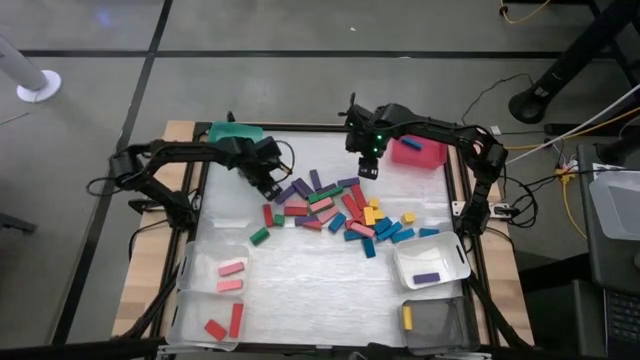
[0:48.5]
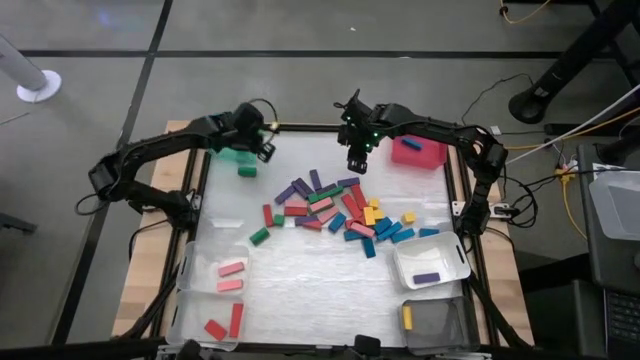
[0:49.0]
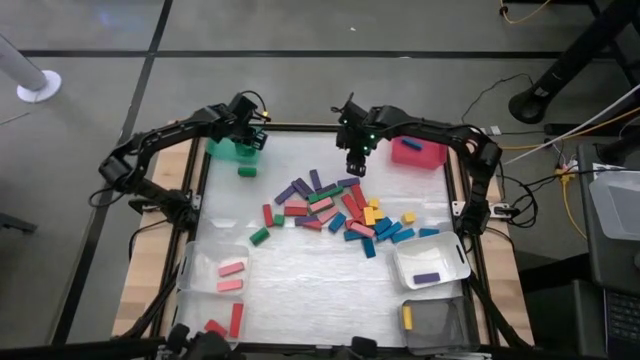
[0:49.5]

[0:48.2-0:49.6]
Task: Sort blocks
Put the green block into the green bin

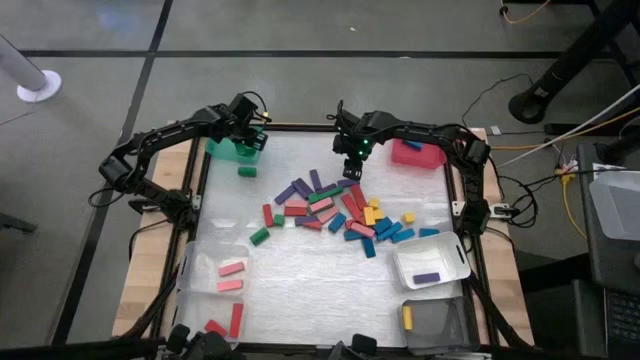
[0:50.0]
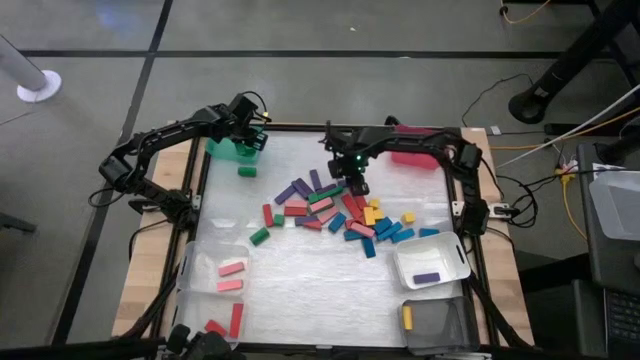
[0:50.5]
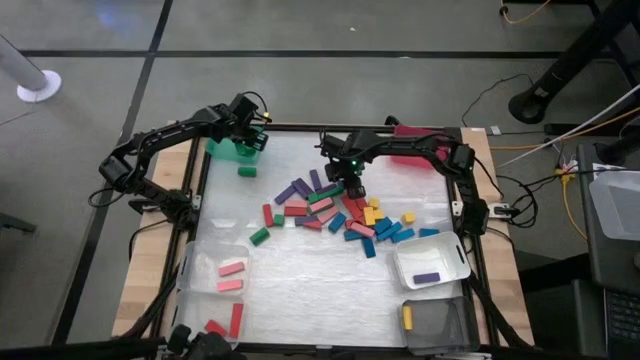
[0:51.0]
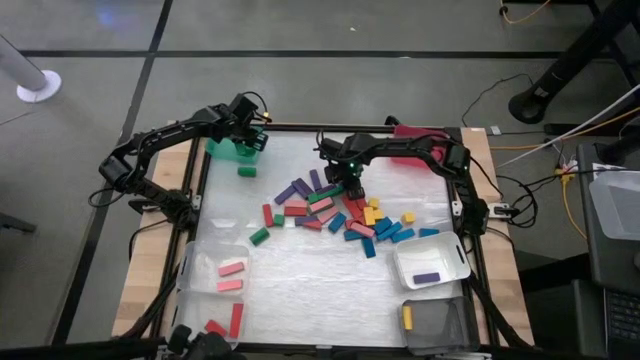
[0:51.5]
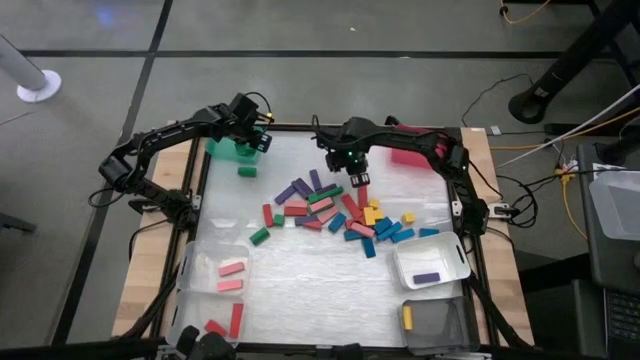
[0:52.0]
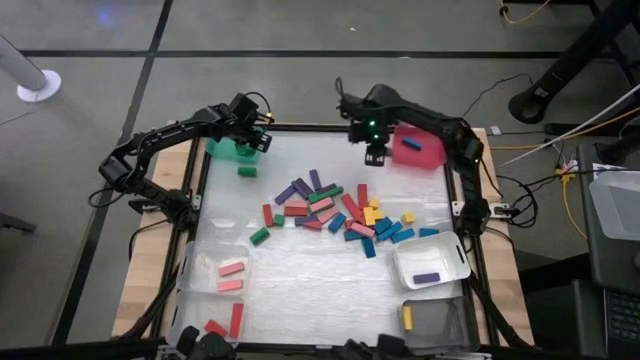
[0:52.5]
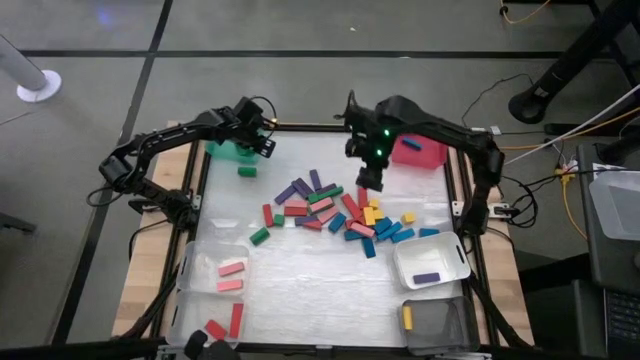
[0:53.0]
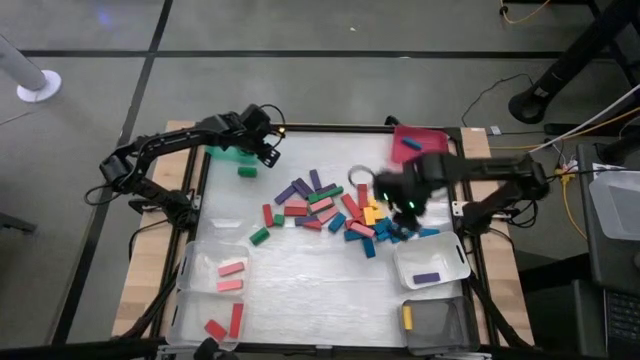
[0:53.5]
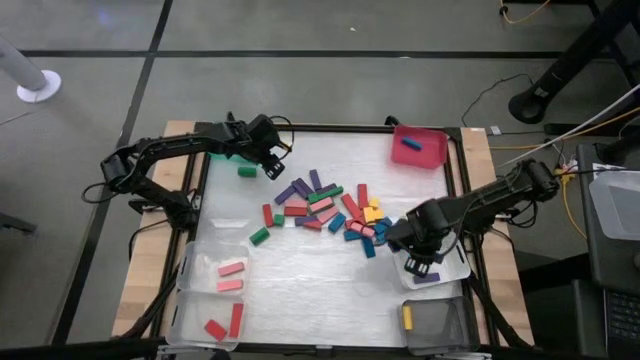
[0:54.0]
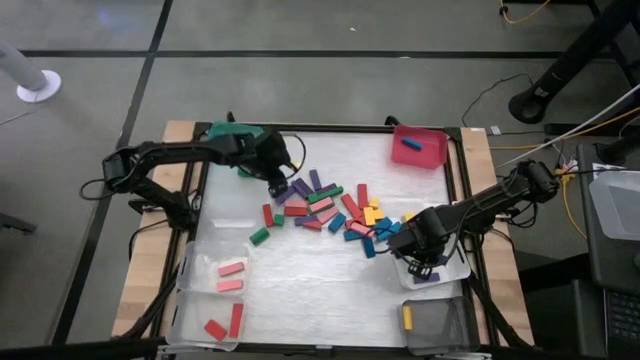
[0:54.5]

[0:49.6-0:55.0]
Put the violet block into the white bin

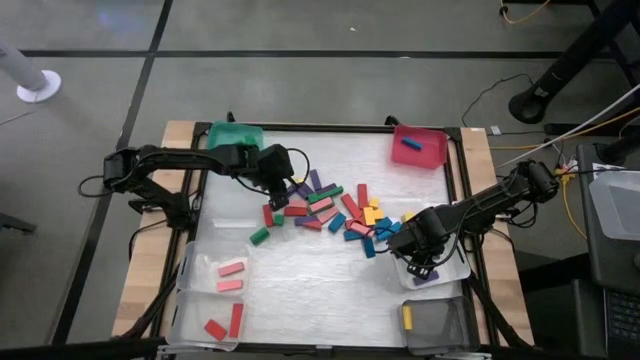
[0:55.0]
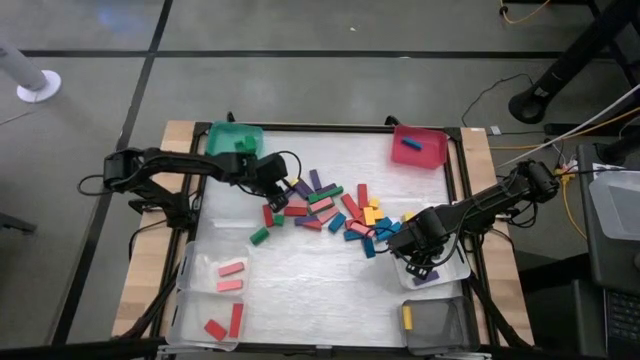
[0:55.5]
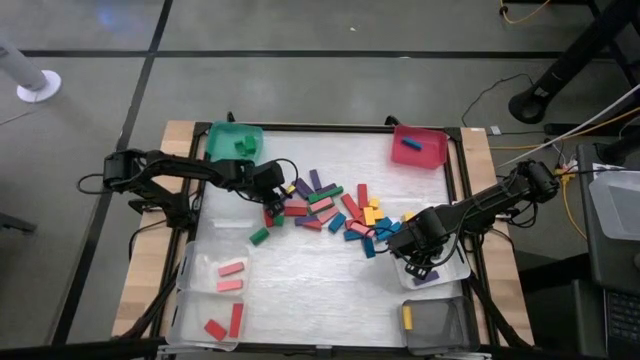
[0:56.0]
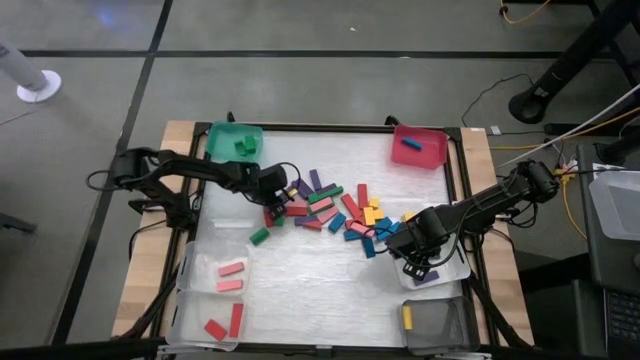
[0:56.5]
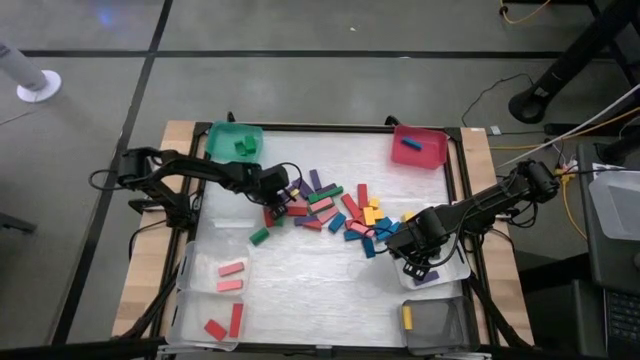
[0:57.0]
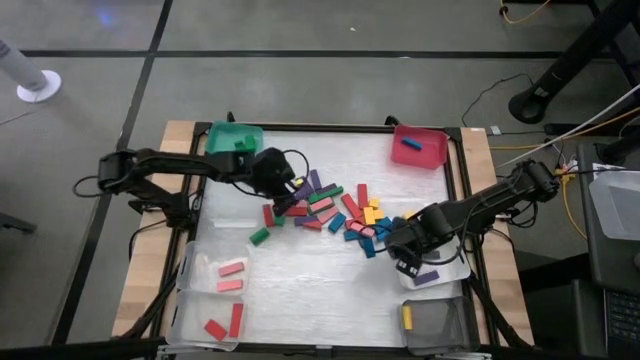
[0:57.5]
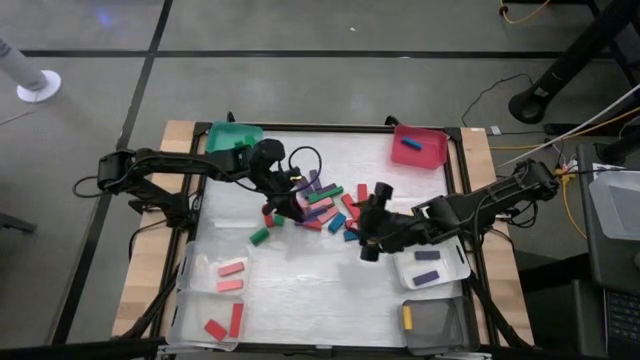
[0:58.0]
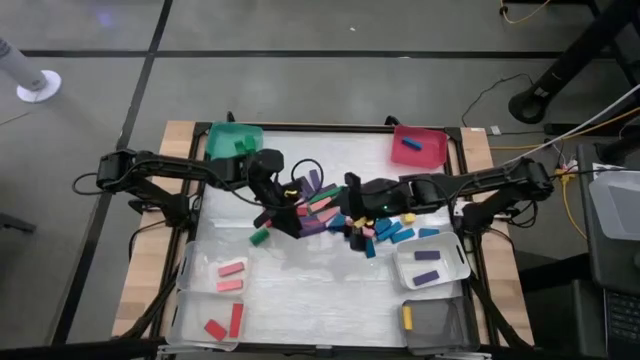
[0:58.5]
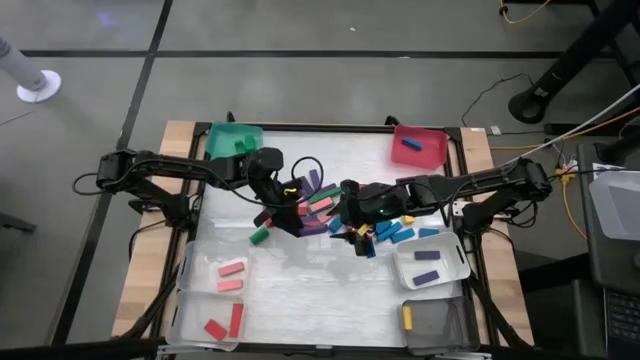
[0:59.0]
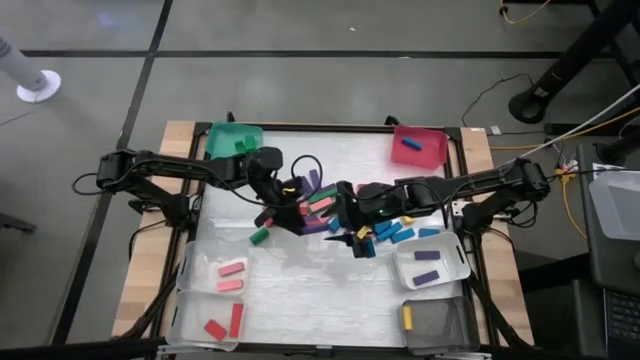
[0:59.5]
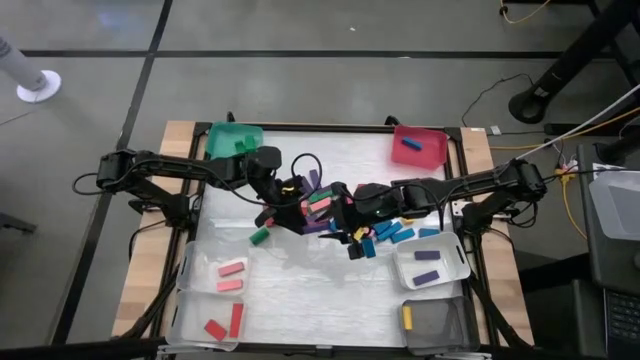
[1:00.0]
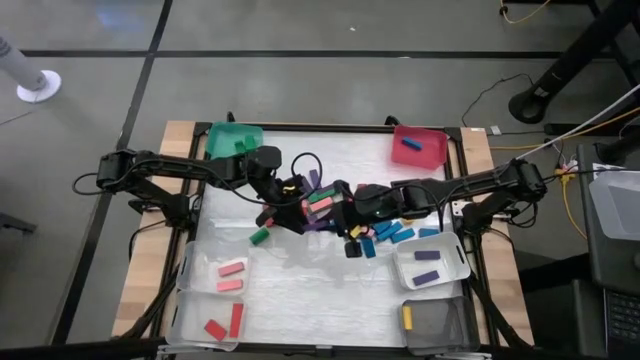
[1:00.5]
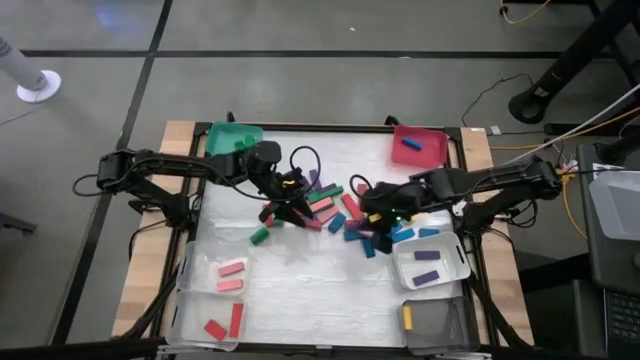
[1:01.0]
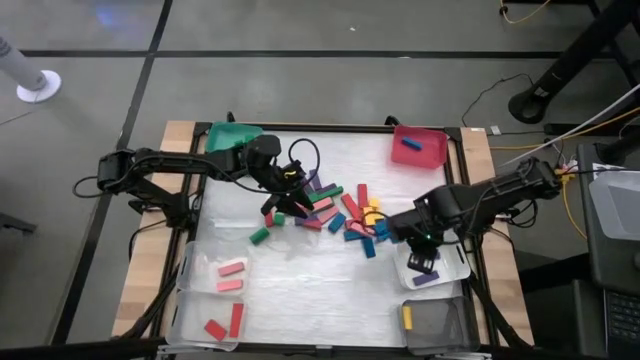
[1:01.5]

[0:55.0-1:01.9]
Put the violet block into the white bin

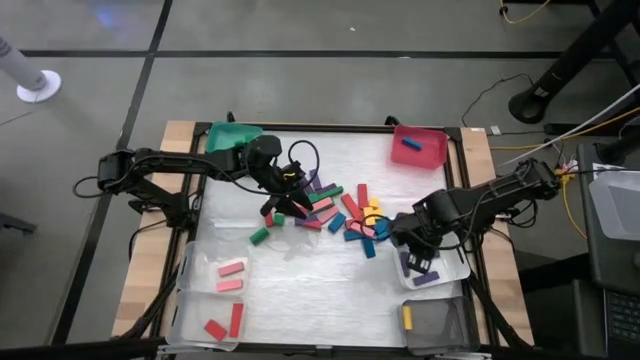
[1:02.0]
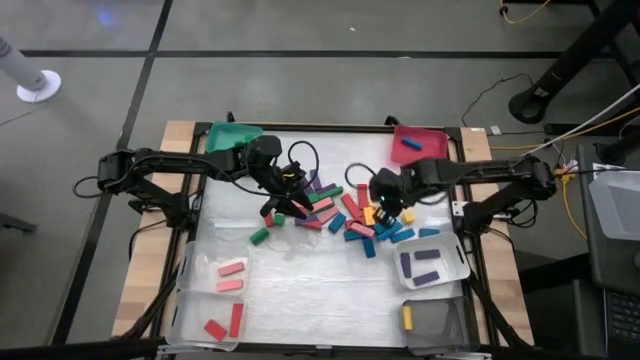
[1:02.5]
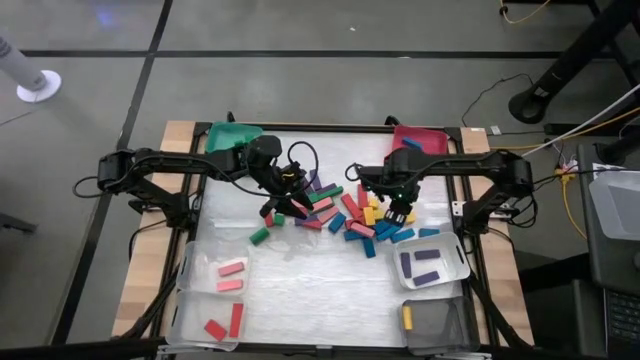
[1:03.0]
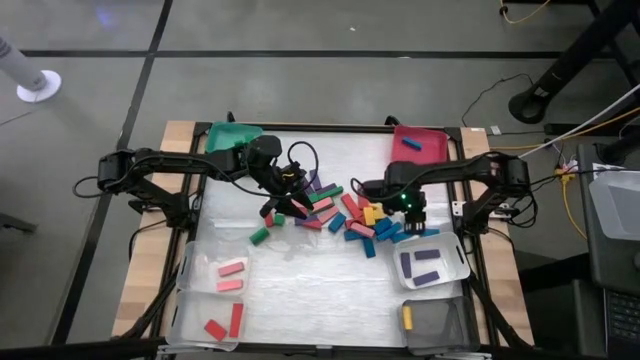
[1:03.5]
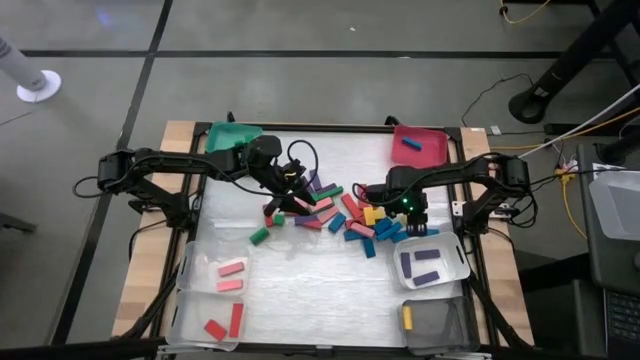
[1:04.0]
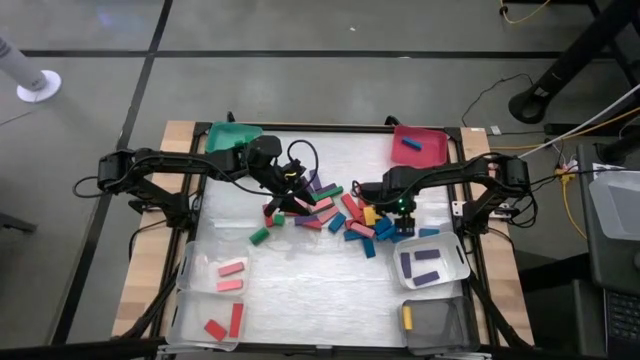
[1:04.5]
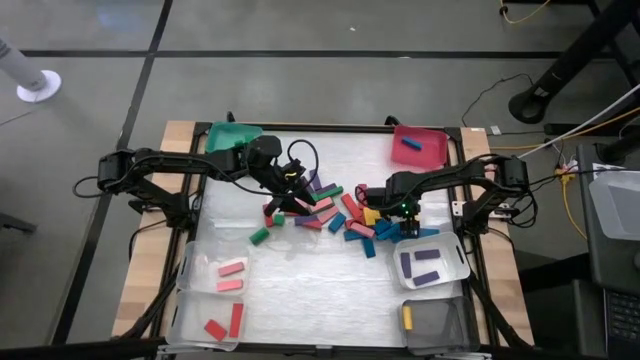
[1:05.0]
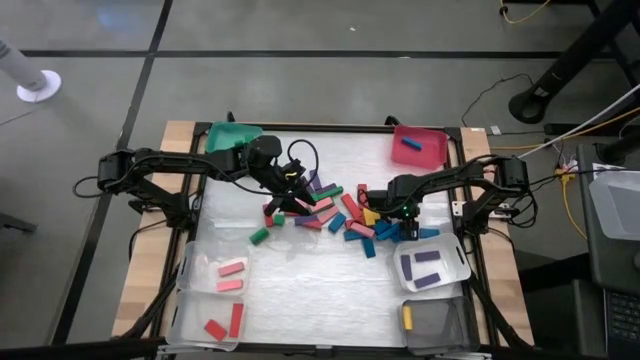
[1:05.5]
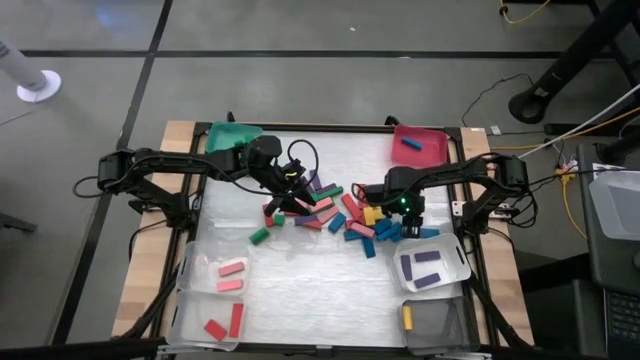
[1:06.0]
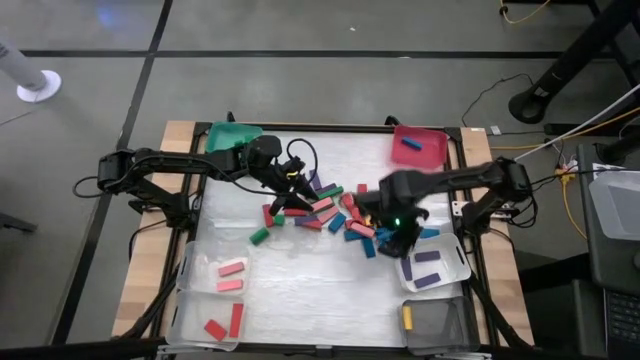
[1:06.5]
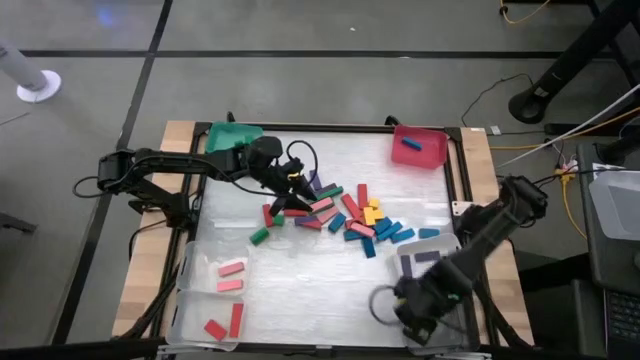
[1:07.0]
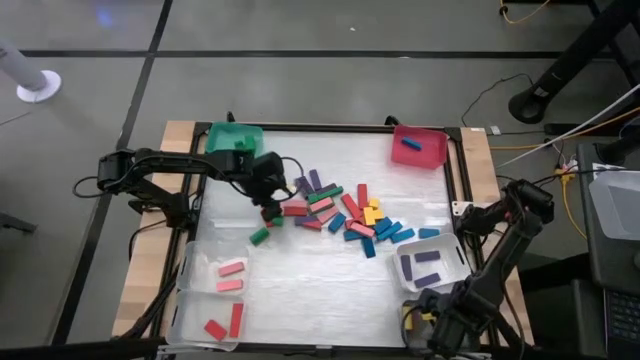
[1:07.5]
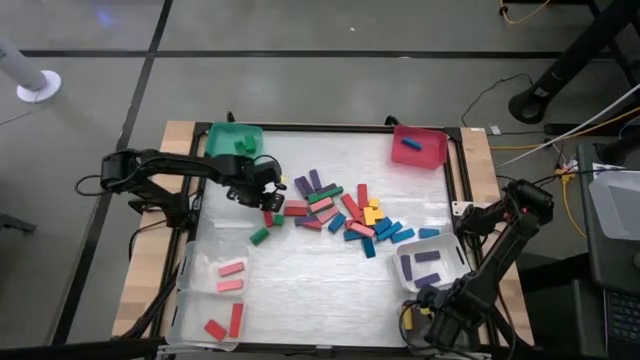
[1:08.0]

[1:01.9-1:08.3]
Put the yellow block into the black bin

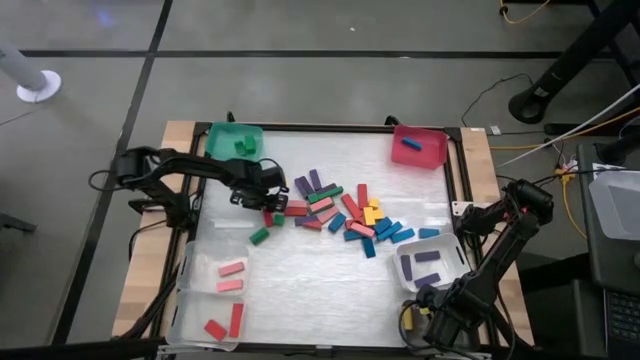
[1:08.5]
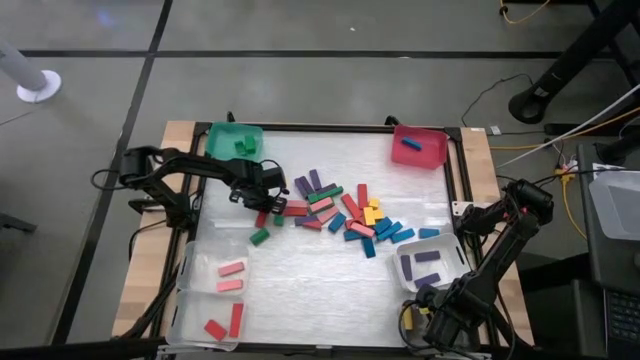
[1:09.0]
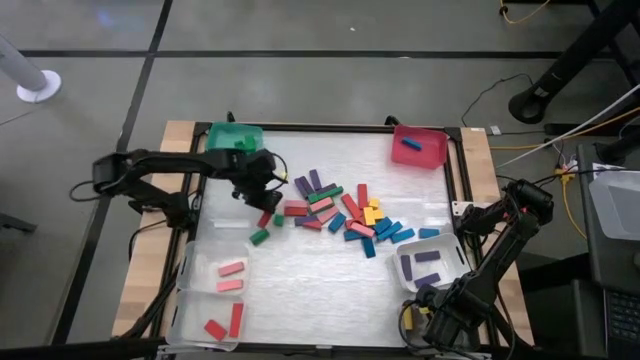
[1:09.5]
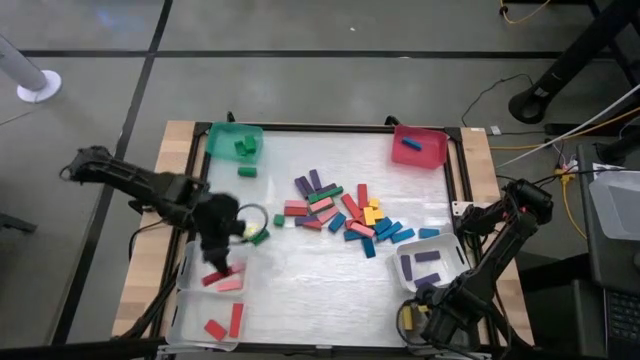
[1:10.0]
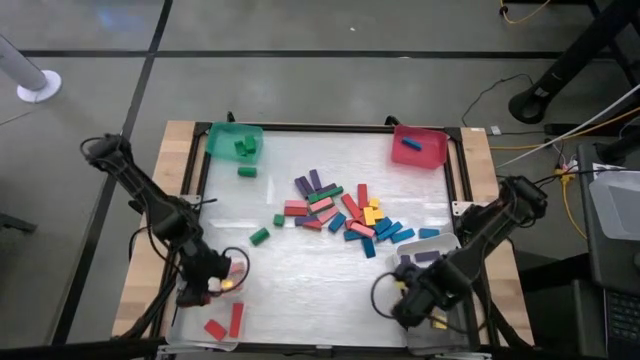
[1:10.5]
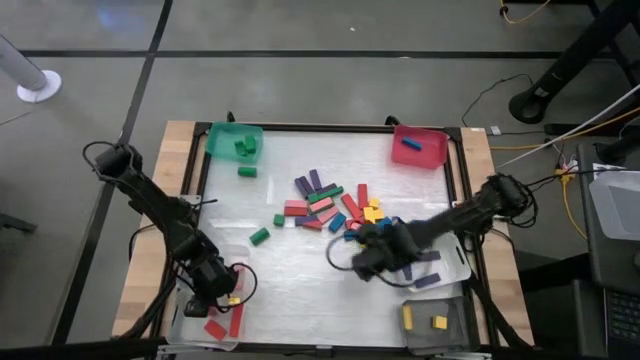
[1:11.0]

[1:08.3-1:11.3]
Put the red block into the bottom transparent bin
